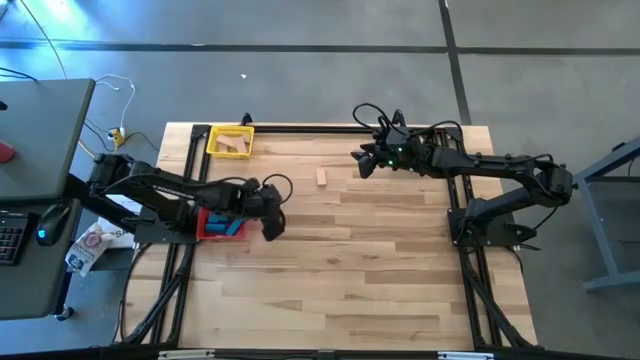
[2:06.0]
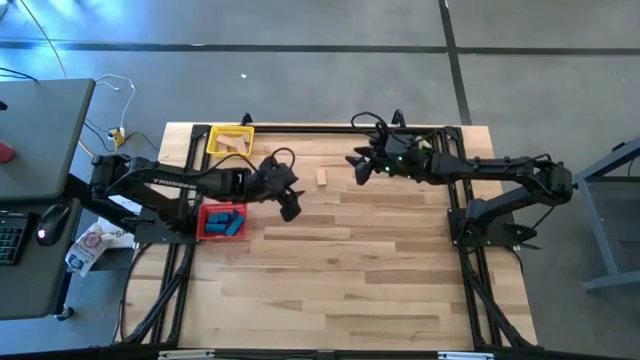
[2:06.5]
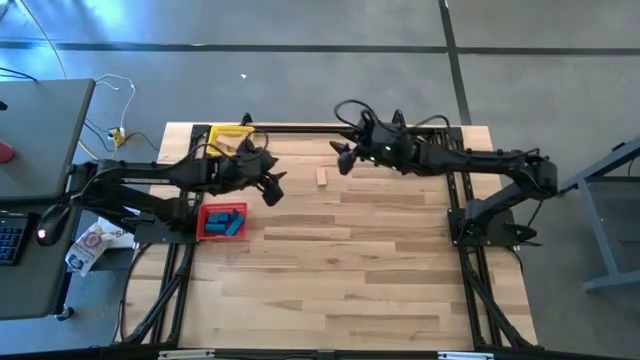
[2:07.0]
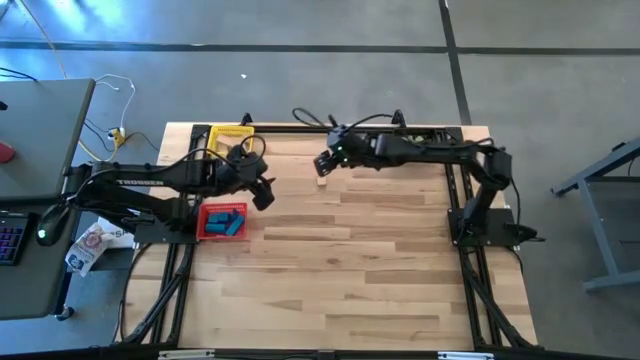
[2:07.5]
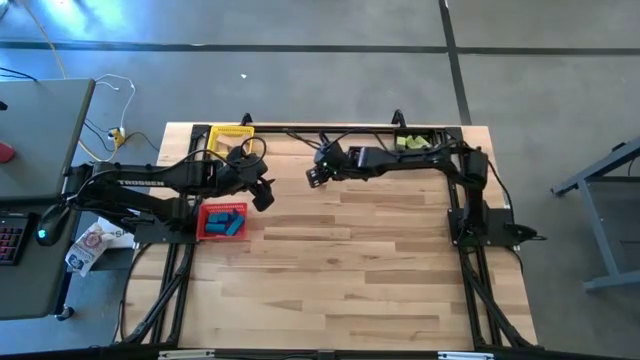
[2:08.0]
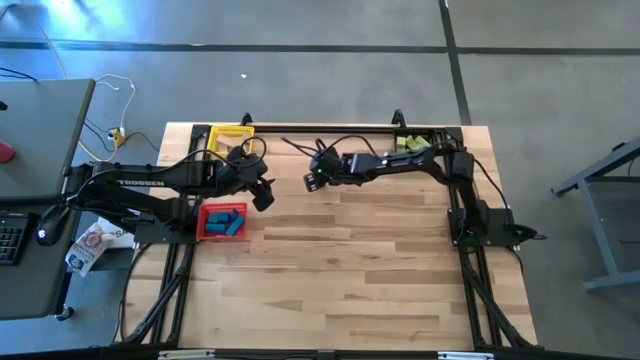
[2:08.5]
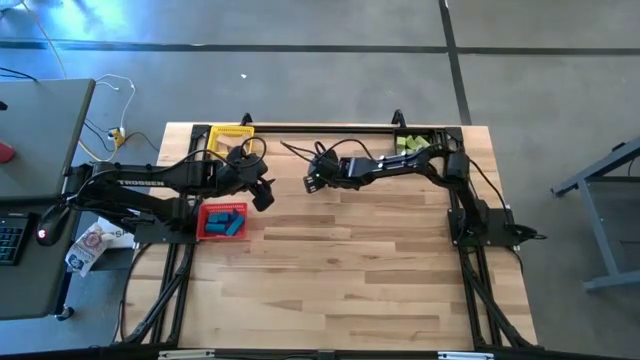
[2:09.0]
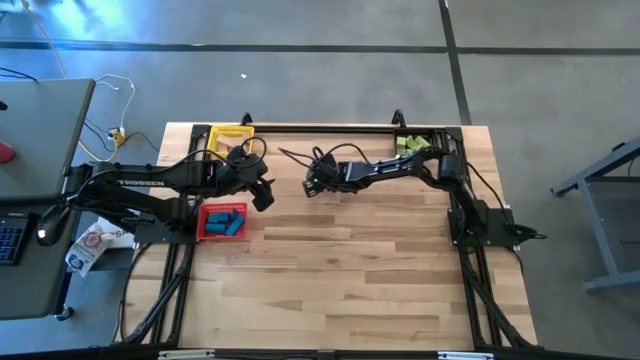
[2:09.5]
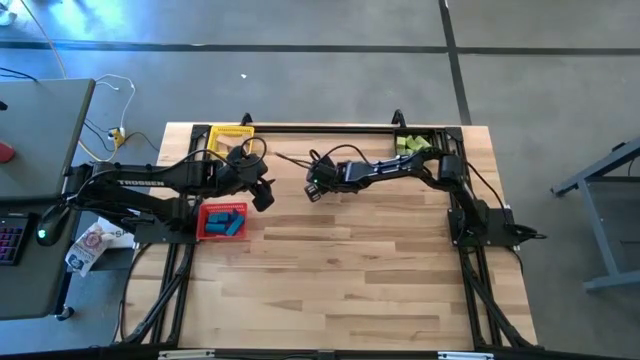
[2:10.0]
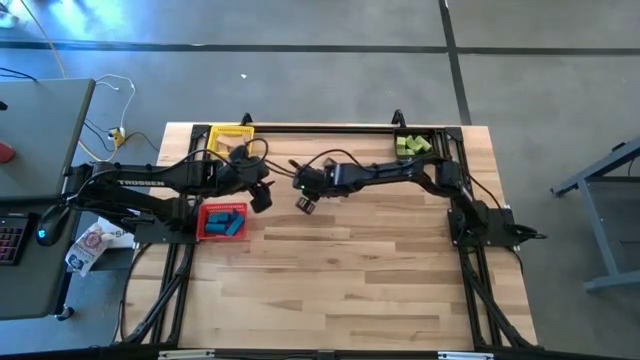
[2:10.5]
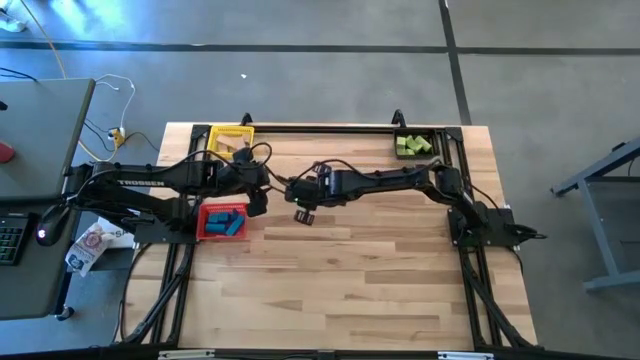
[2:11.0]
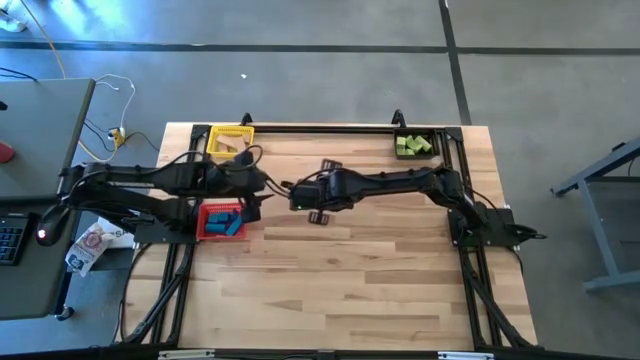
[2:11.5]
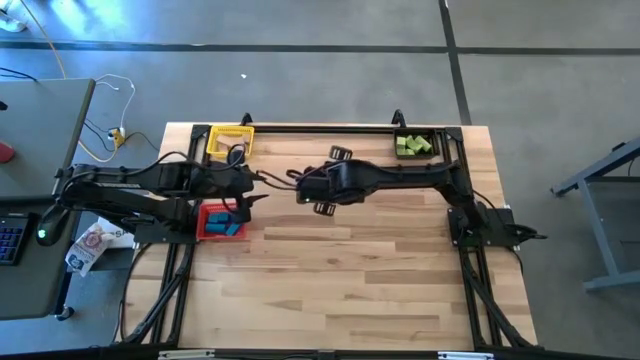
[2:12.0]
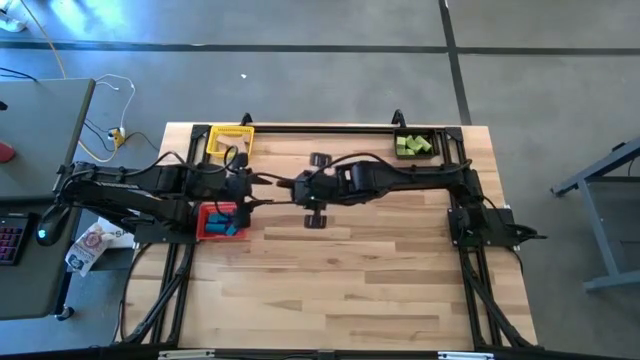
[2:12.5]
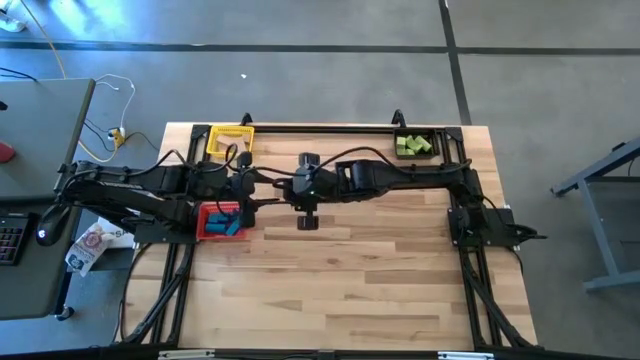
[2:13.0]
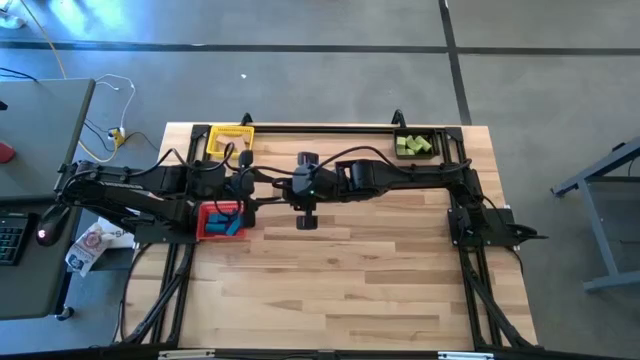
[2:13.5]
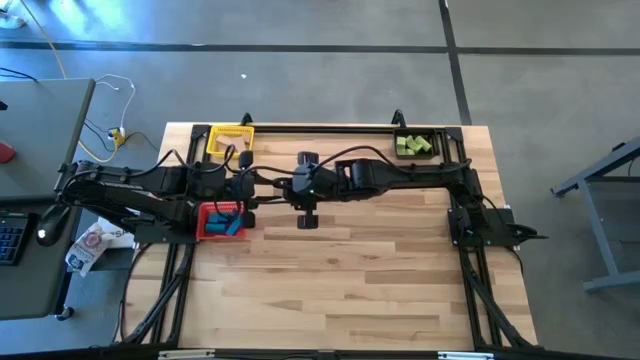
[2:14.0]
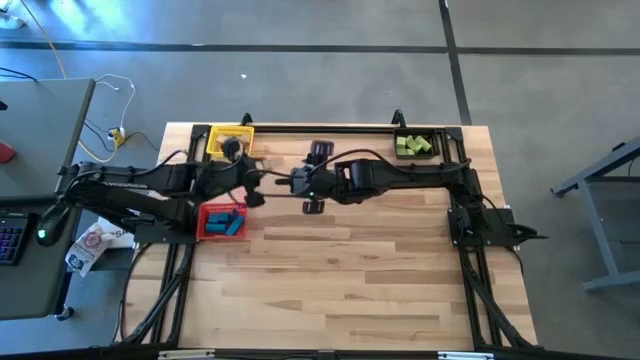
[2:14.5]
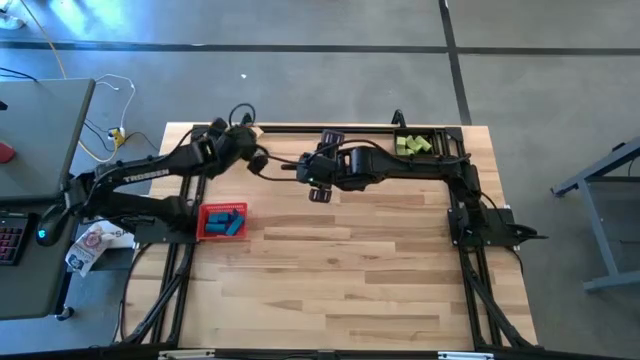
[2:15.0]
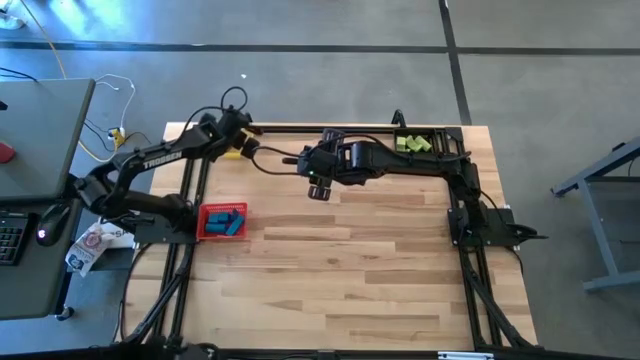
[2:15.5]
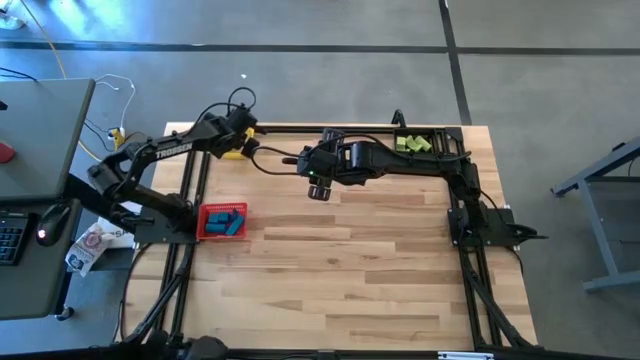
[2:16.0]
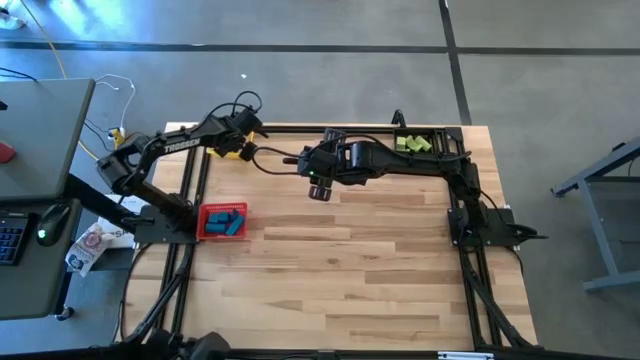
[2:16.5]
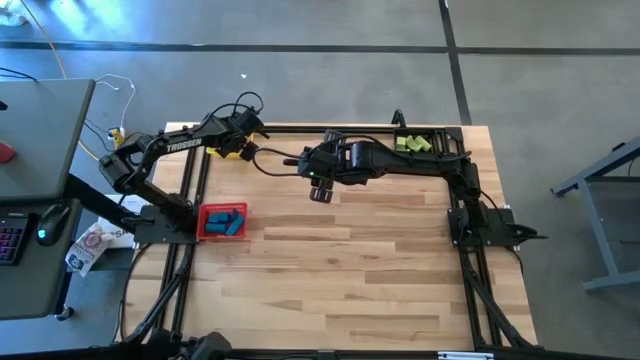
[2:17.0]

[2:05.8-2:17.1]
Task: Sort & place blocks by color
Put the brown block into the yellow bin

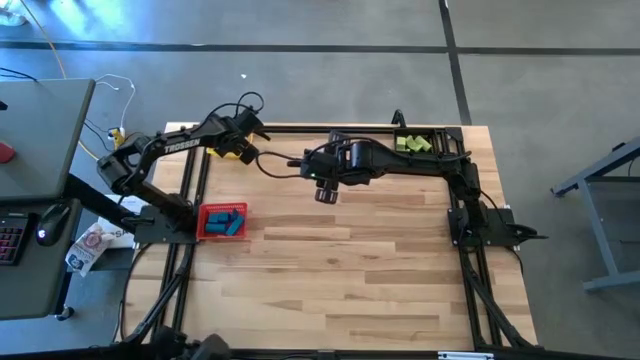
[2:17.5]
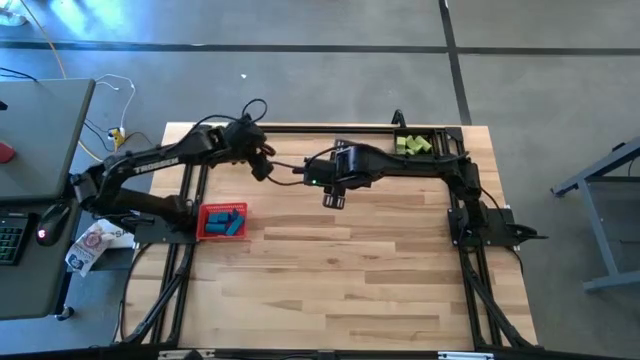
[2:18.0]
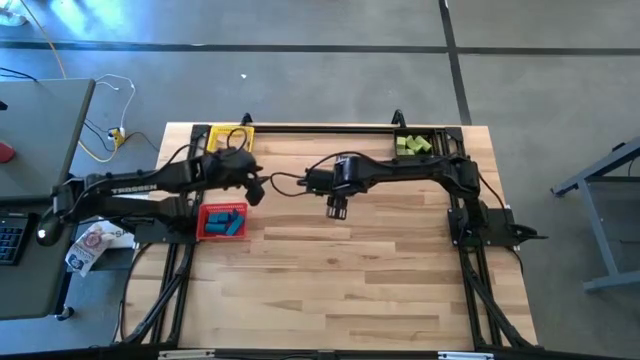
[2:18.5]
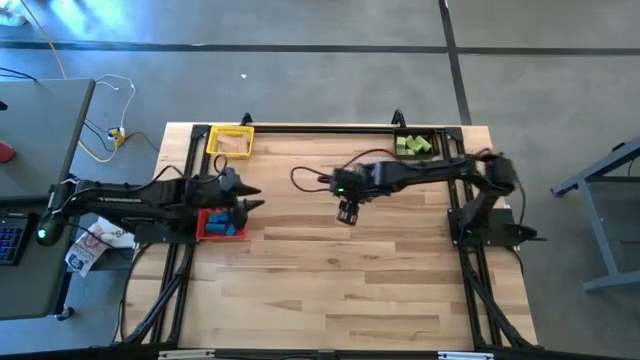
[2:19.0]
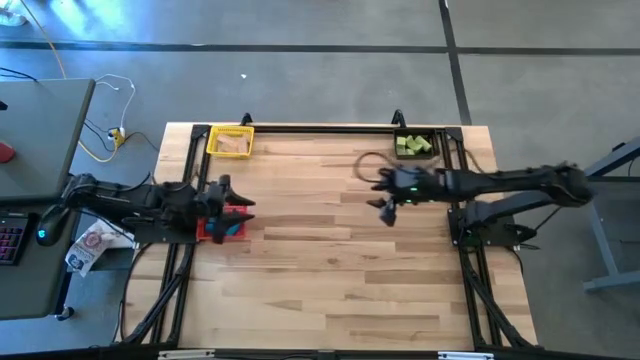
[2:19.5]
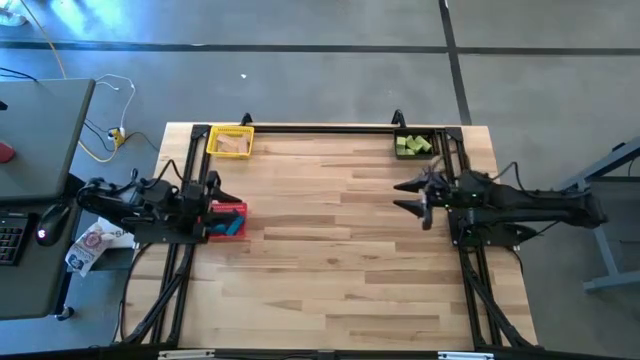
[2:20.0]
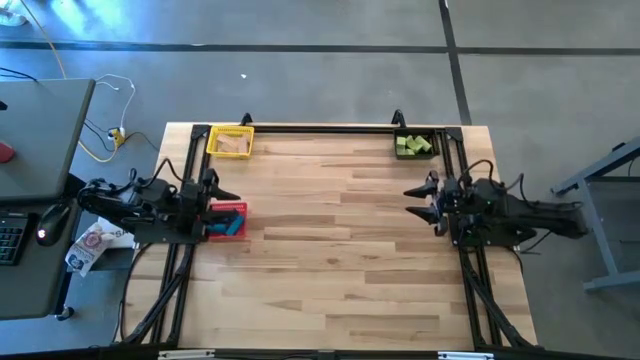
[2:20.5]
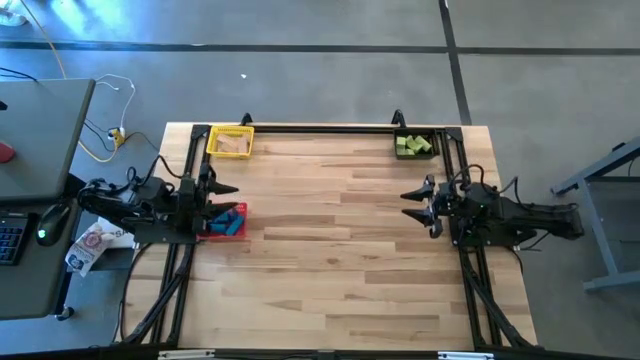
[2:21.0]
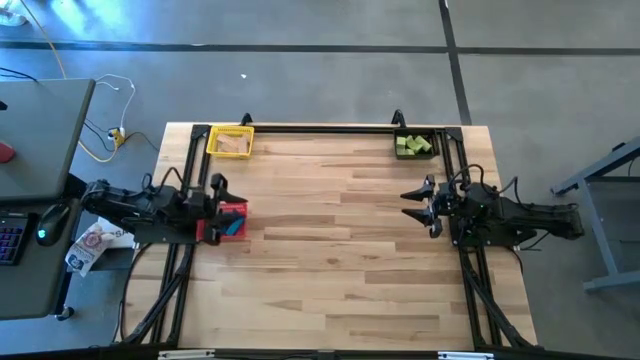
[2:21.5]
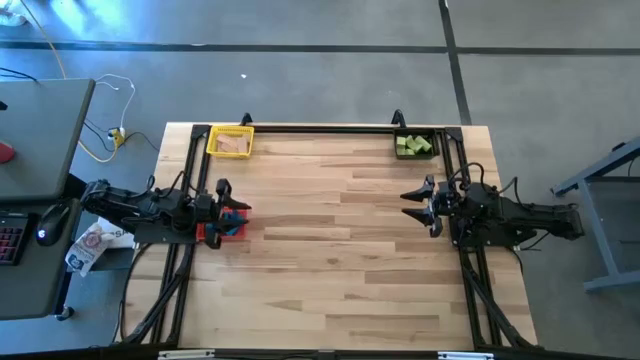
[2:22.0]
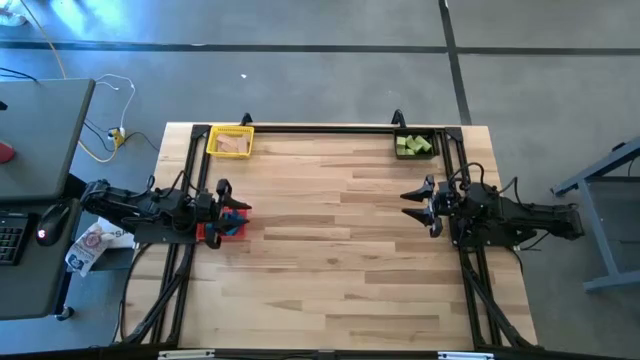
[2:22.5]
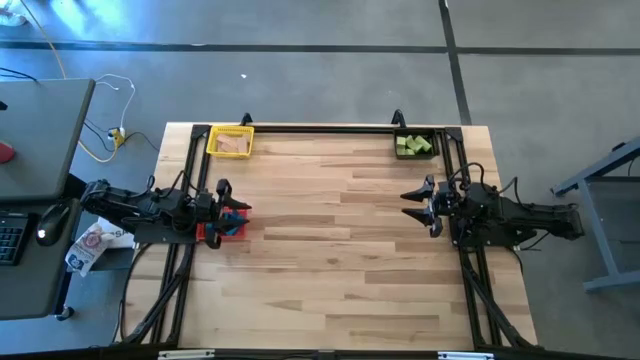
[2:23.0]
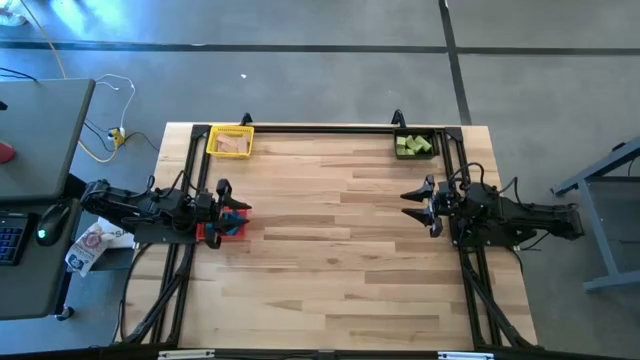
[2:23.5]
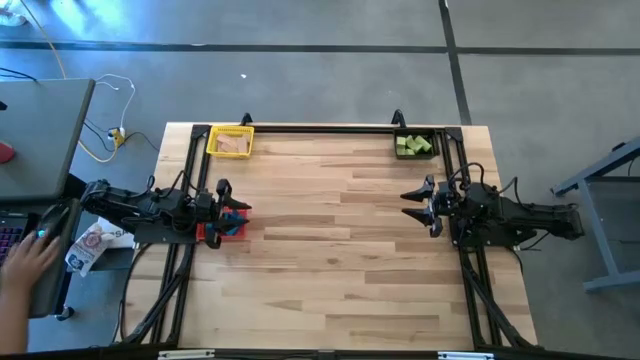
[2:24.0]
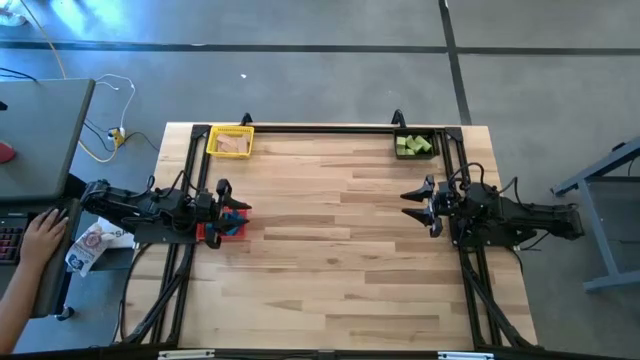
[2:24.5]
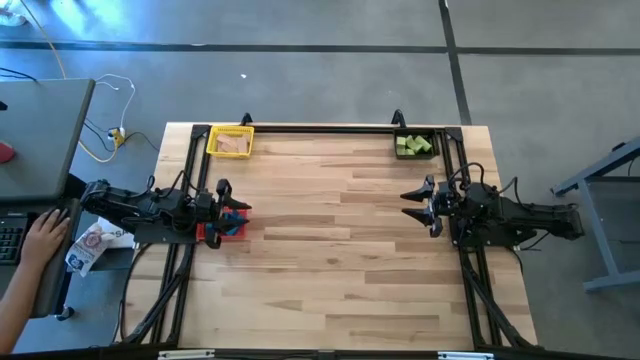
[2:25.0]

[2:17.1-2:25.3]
Return to Home Position

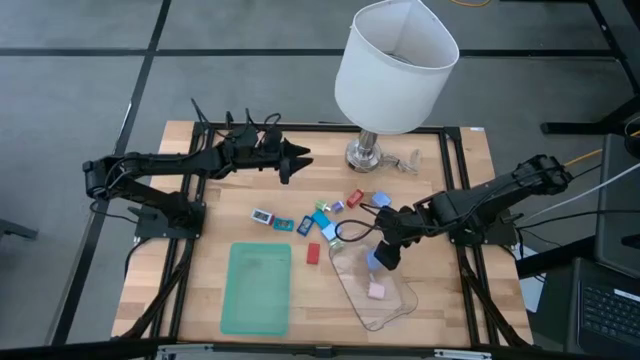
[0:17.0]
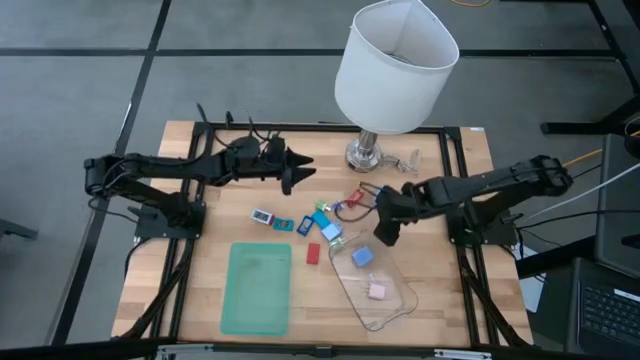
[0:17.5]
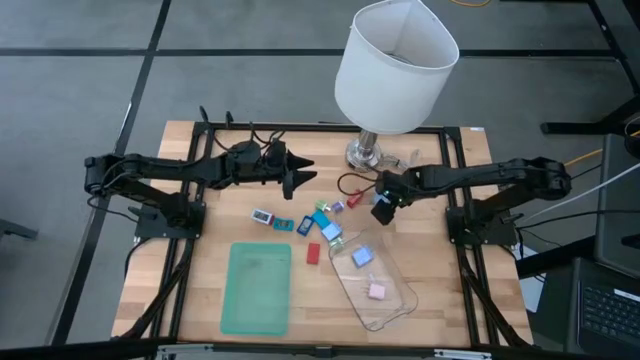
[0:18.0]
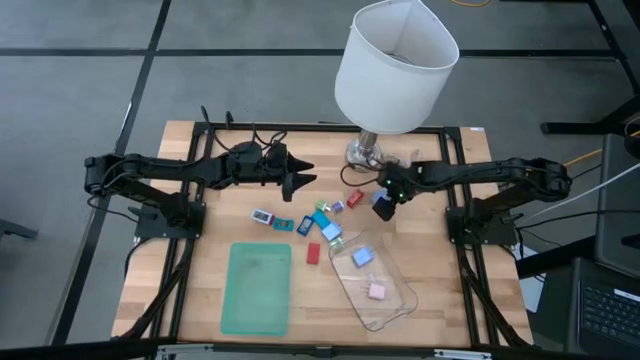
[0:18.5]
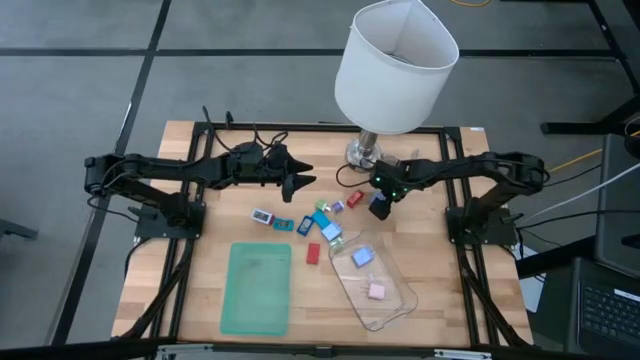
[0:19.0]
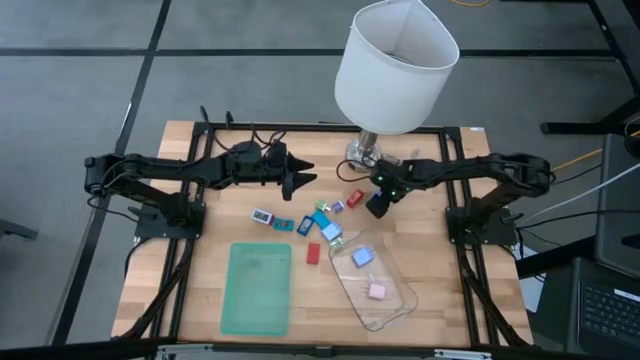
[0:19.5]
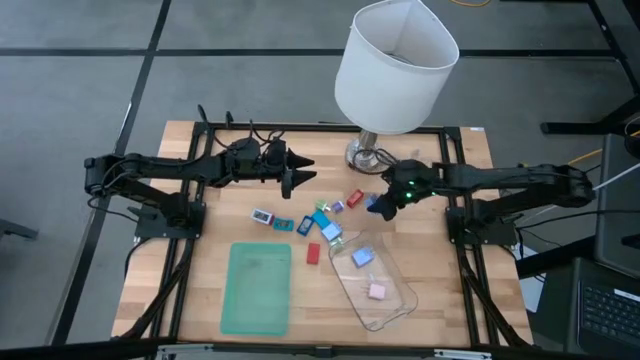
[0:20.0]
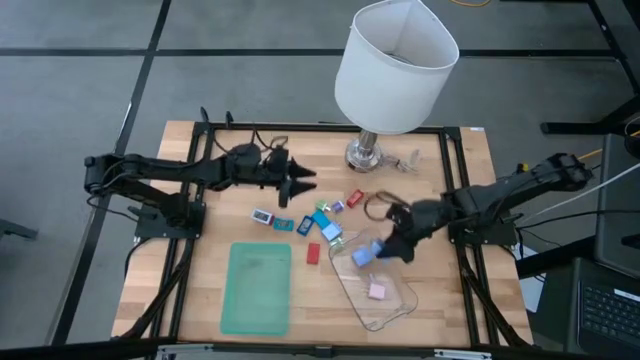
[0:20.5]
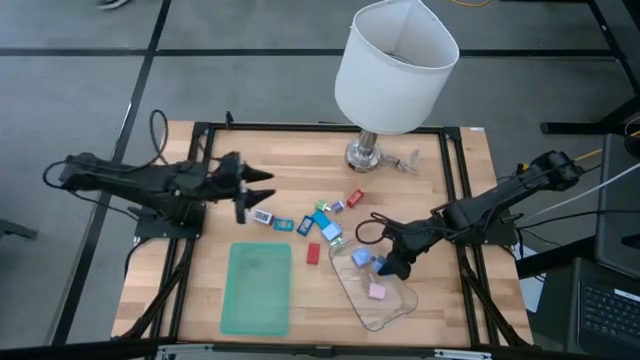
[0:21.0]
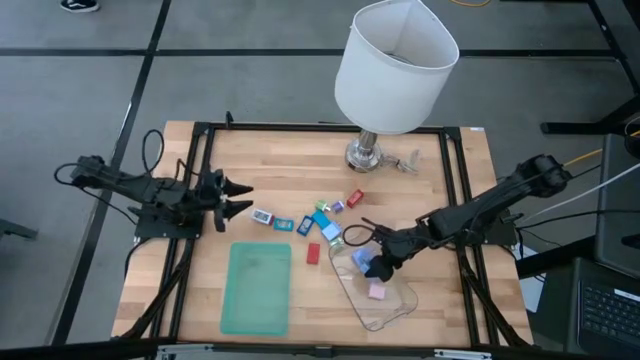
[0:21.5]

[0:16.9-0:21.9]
Task: Pick & Place Office items
Put the top light blue charger adapter into the transparent bin
